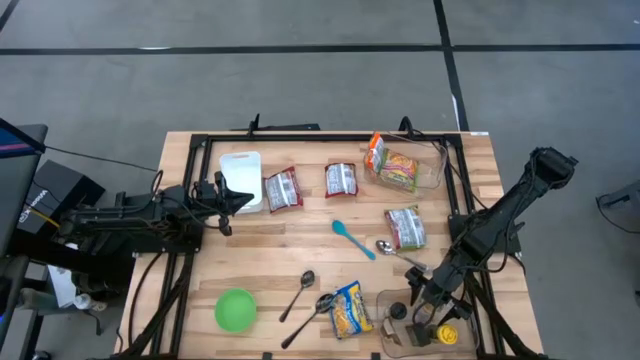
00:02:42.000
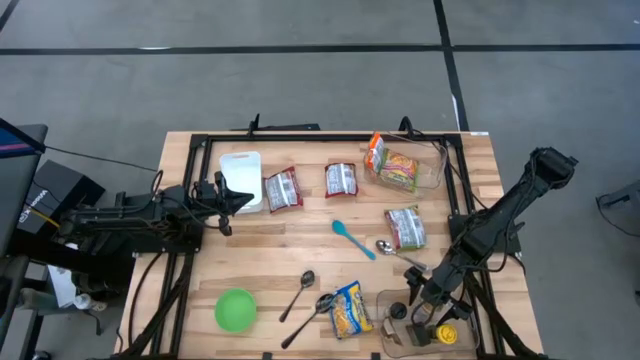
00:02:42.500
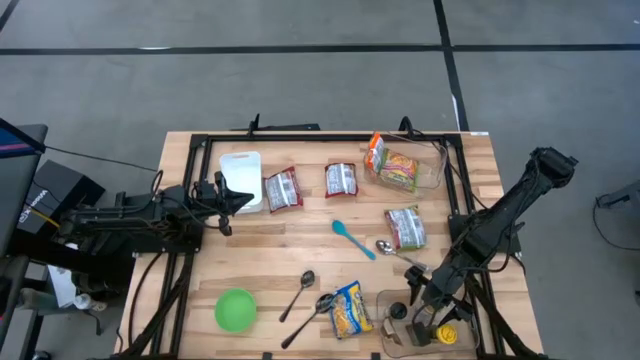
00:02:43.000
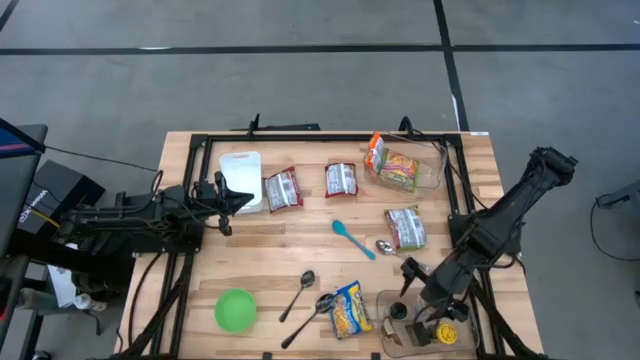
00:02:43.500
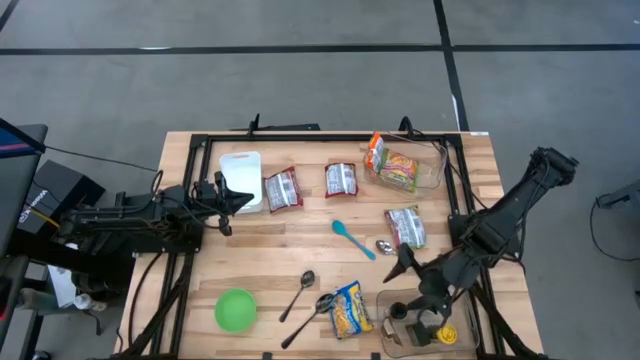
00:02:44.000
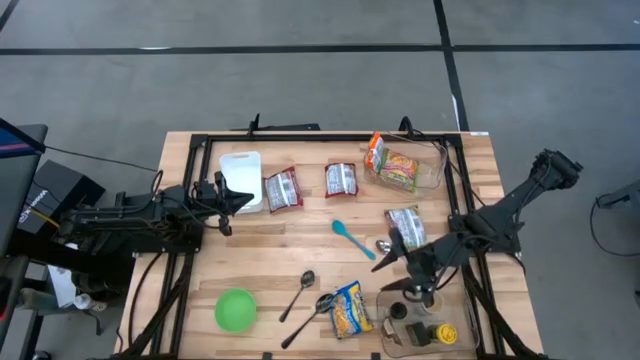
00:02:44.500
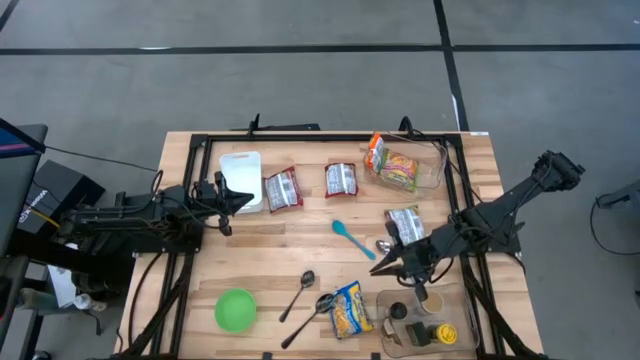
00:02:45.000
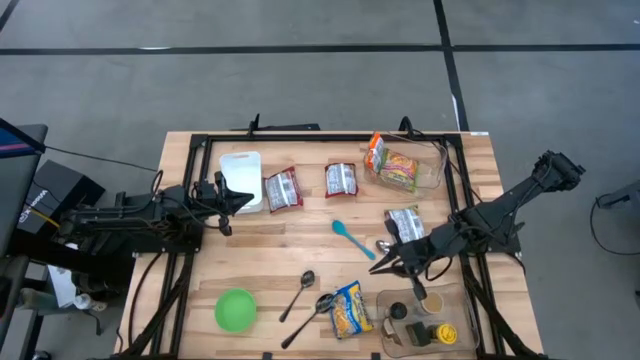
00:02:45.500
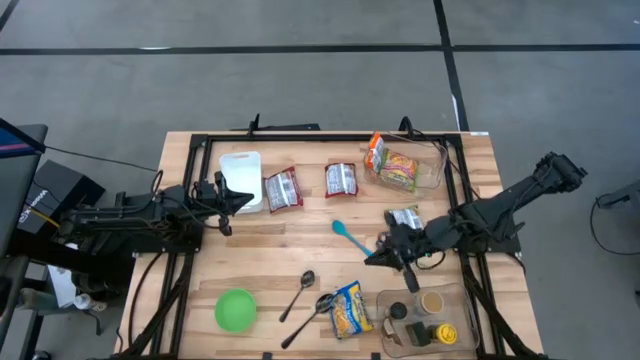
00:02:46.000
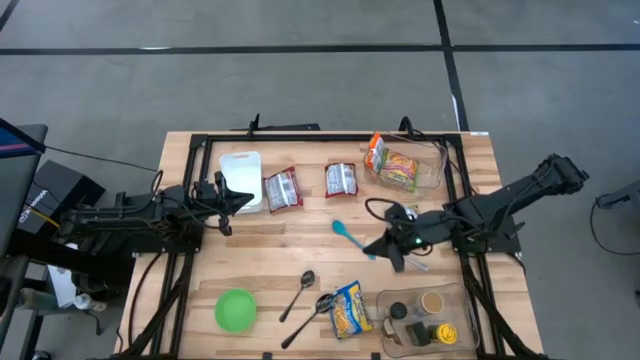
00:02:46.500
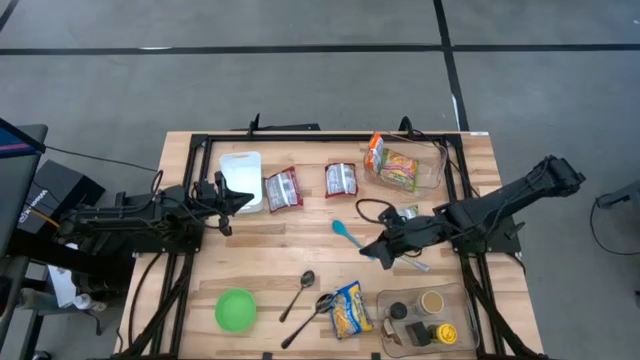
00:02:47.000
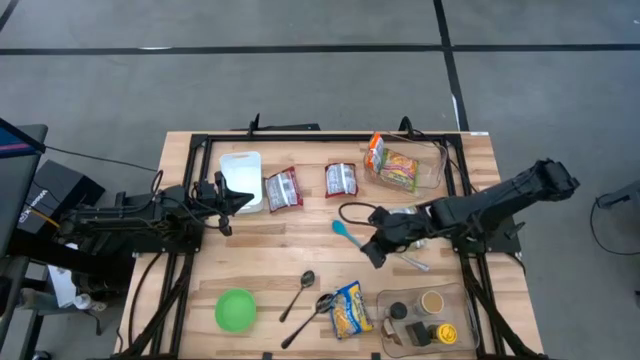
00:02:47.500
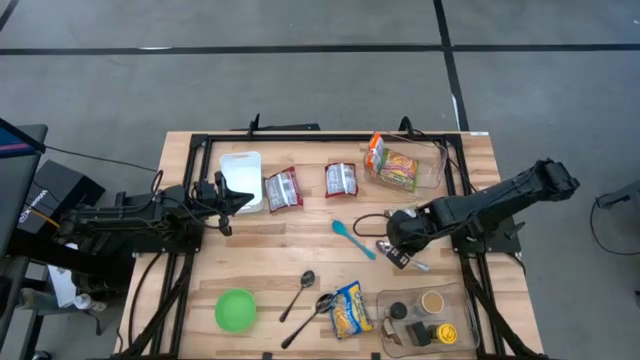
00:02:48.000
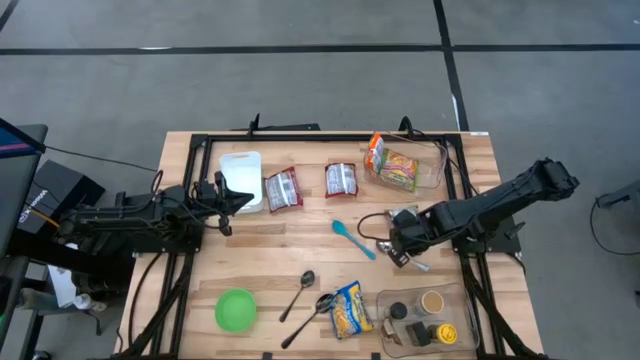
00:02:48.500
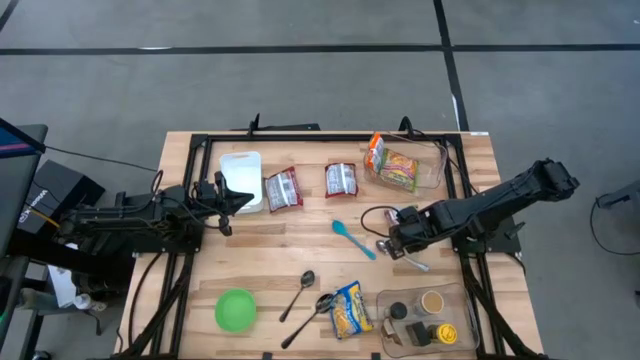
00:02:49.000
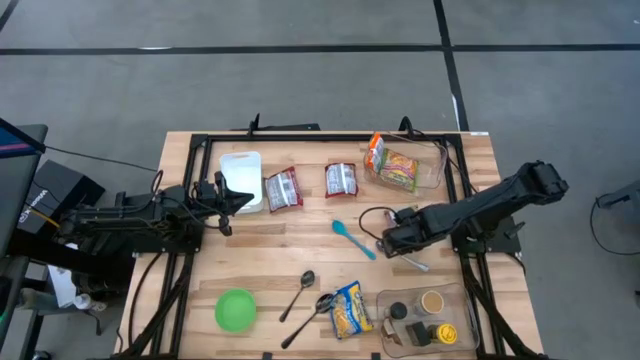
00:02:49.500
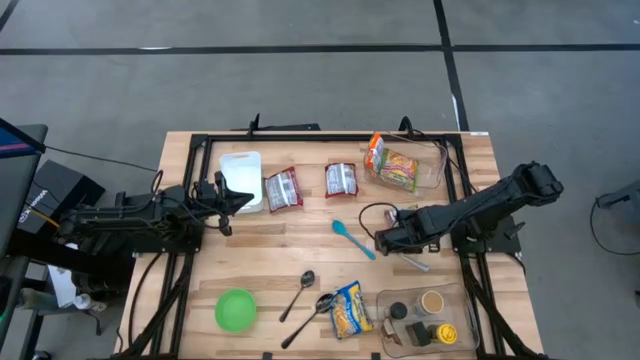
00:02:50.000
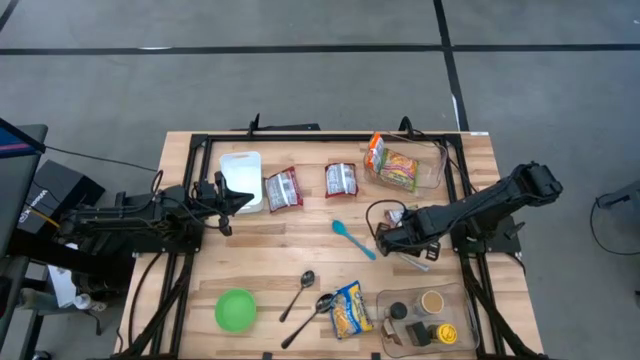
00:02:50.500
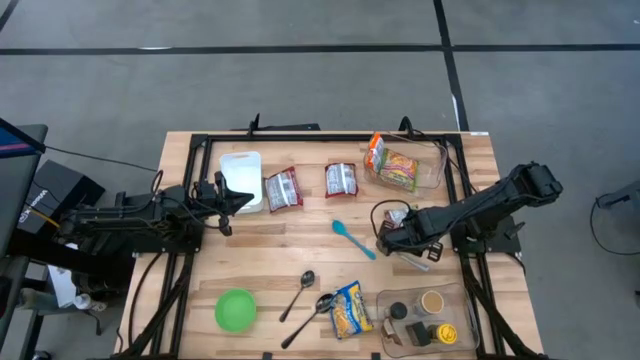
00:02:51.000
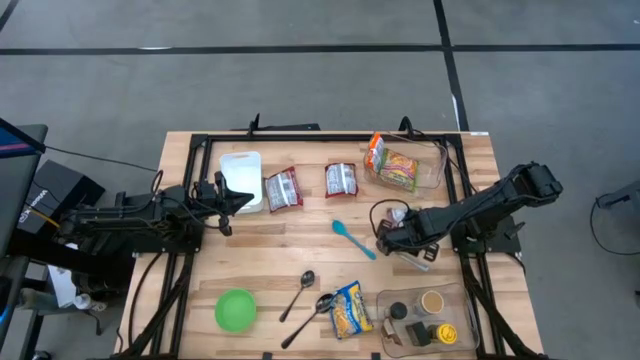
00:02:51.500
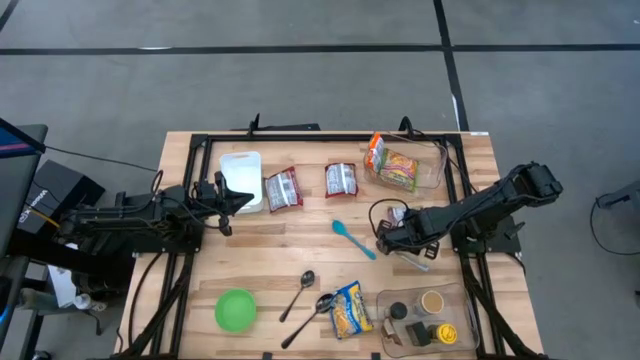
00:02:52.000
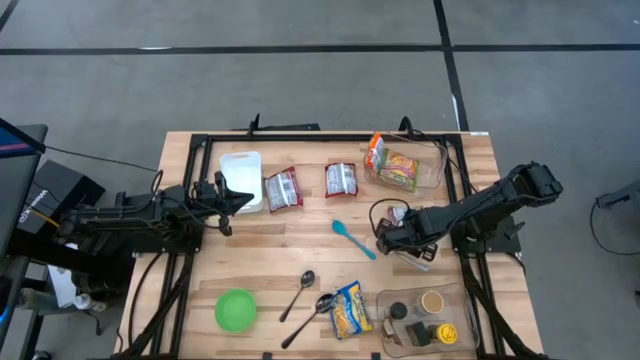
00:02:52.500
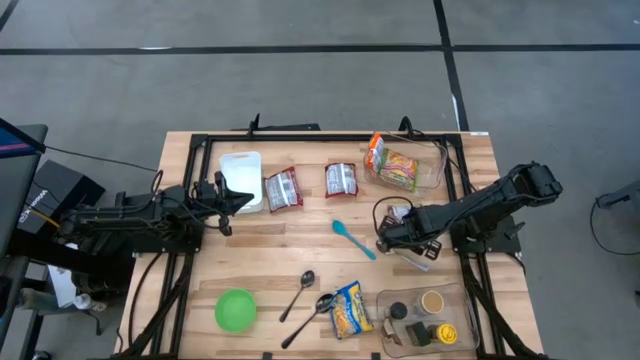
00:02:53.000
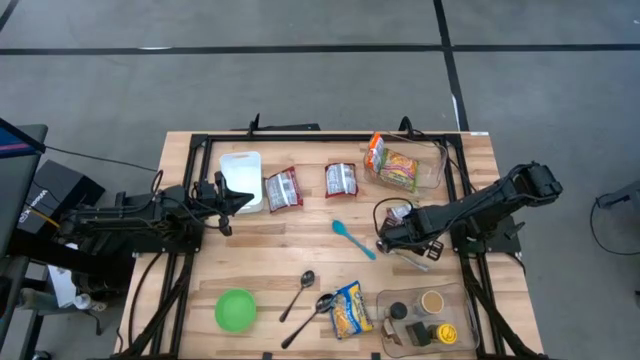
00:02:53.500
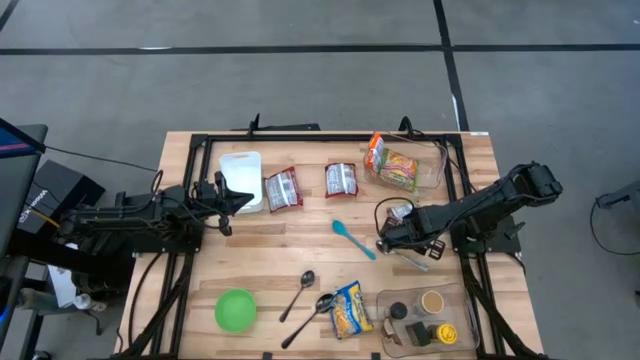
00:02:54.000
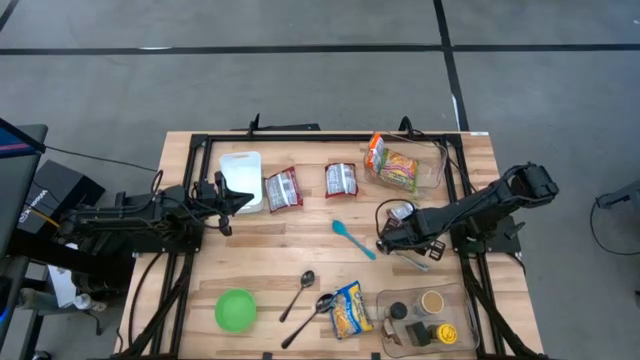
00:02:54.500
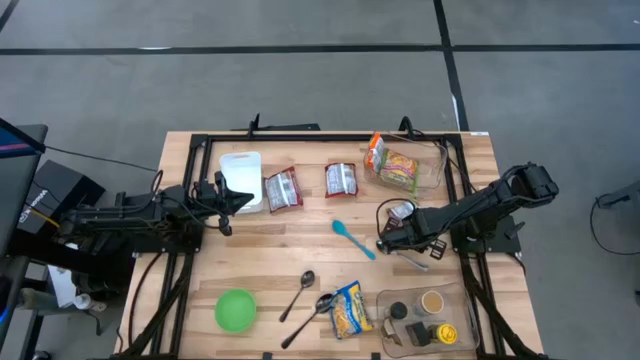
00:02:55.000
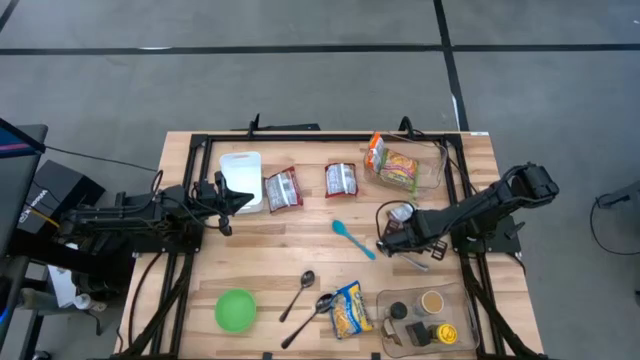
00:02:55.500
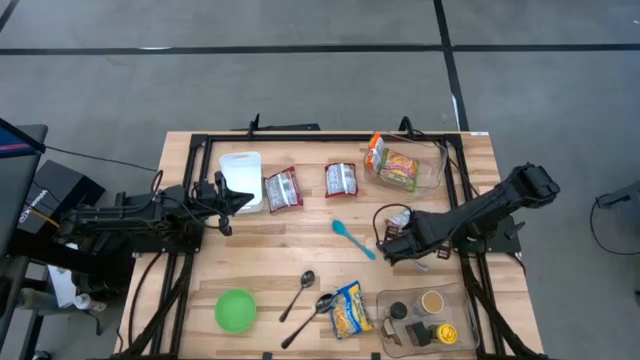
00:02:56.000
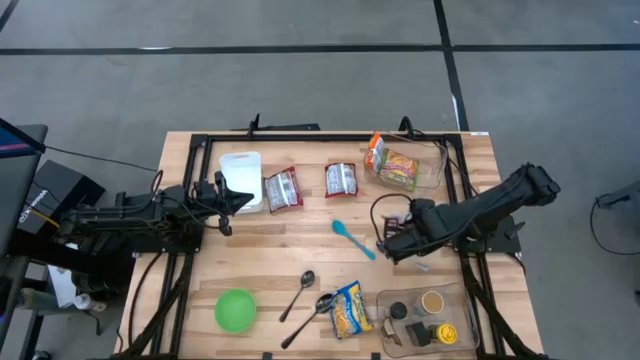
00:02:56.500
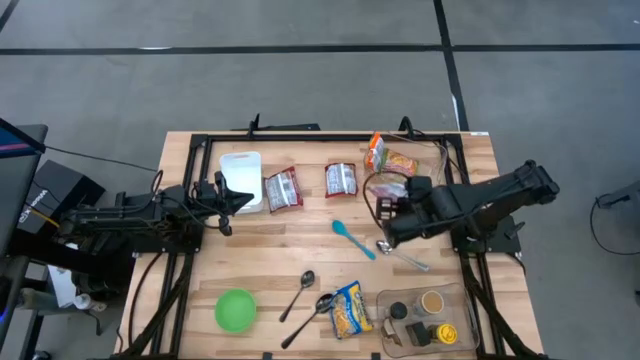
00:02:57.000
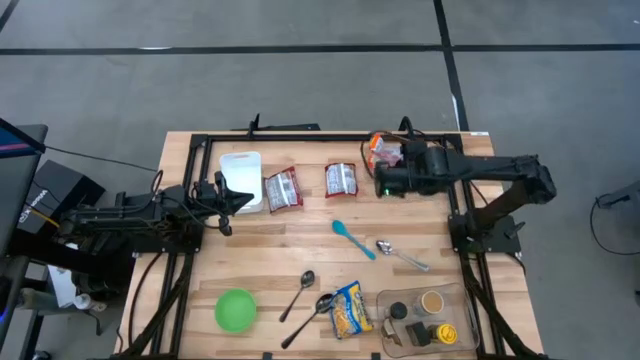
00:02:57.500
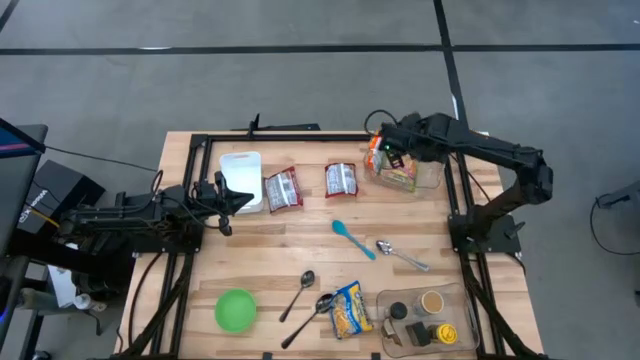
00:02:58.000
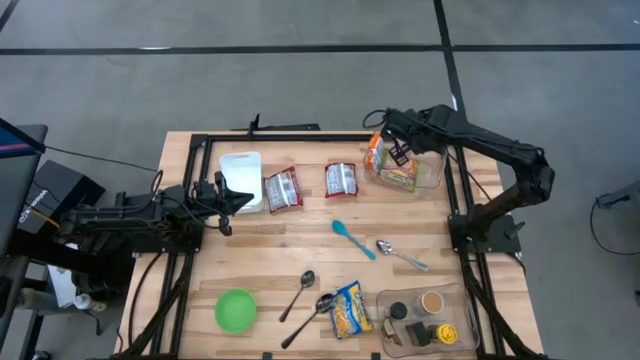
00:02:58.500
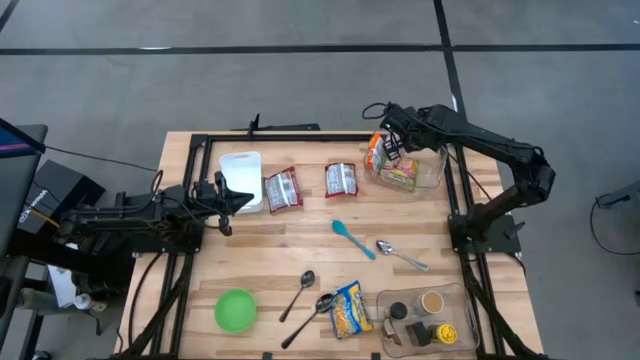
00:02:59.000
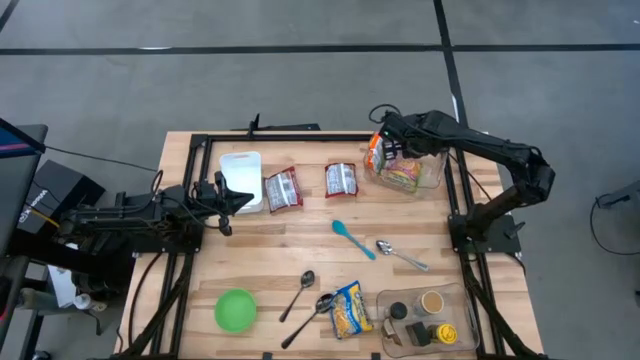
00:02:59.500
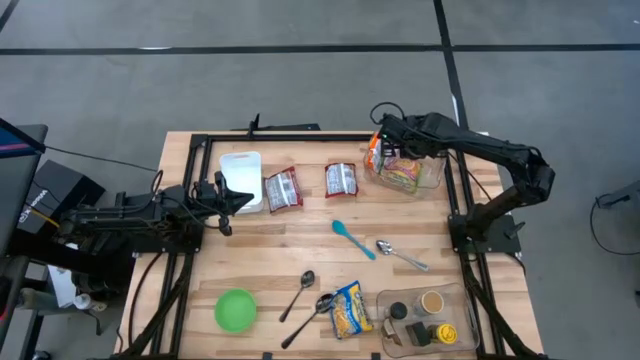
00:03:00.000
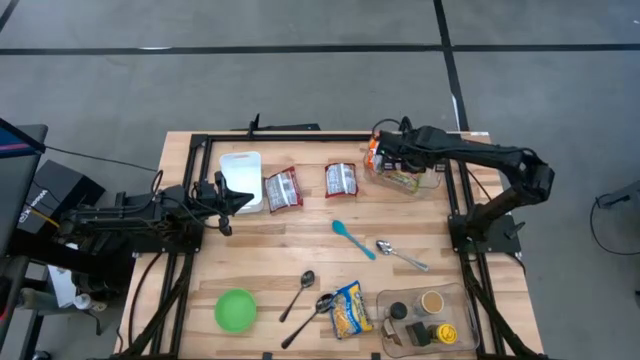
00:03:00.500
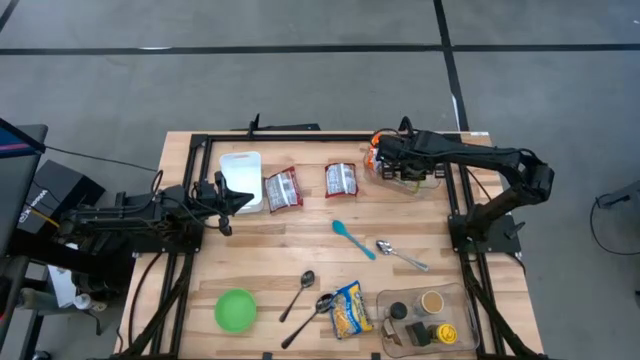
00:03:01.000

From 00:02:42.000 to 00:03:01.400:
Task: Pick & Place Food Item
Put the green noodle pack into the top transparent bin

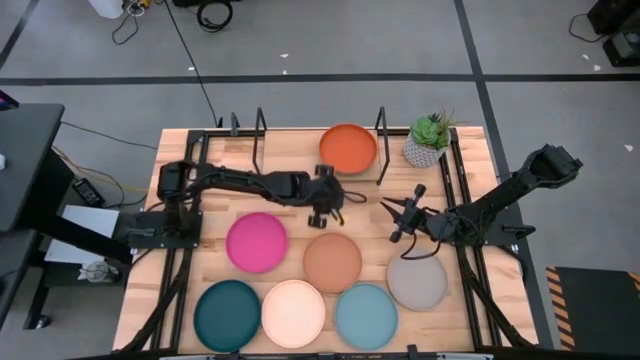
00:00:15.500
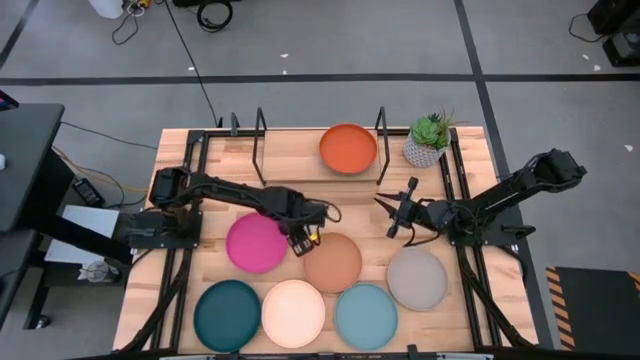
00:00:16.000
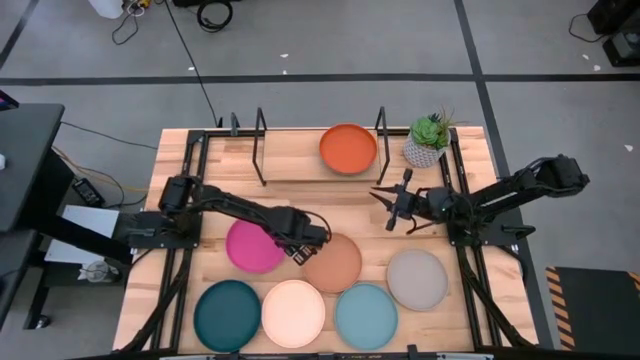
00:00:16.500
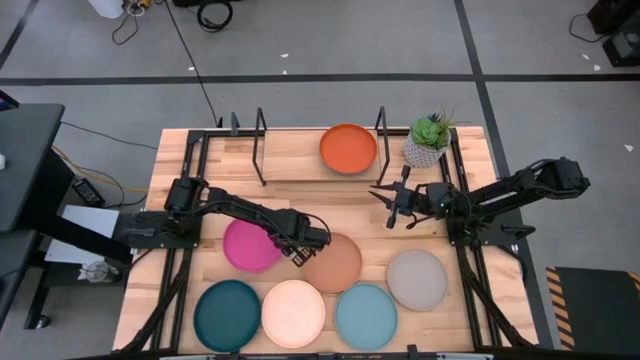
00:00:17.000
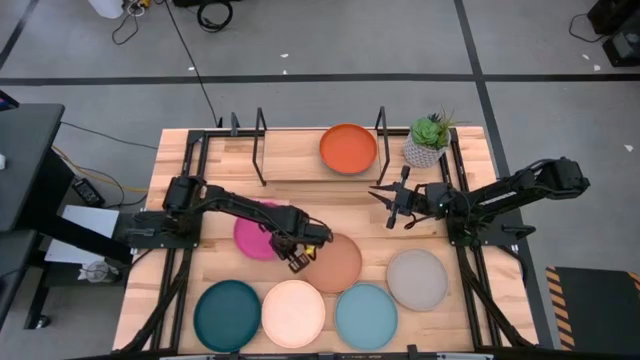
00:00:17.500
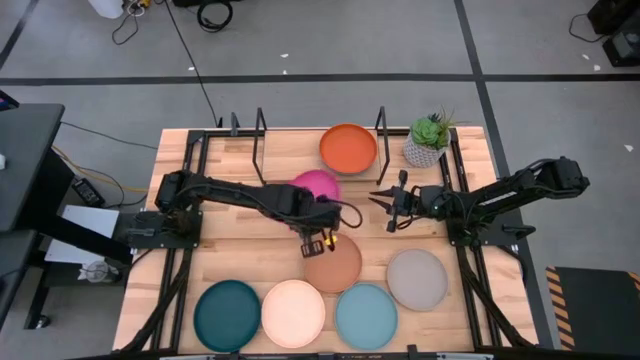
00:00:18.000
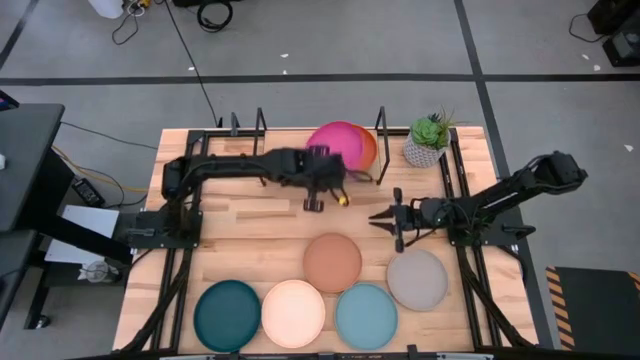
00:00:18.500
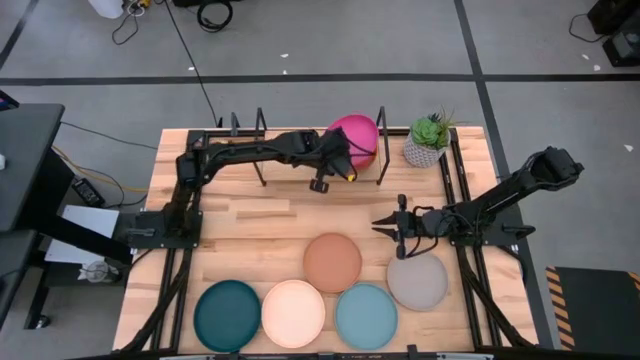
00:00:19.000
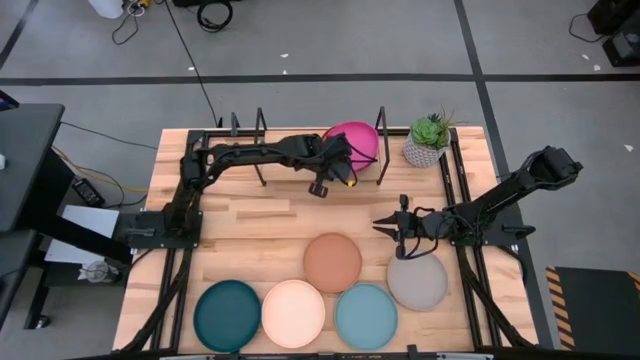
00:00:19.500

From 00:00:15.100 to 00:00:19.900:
Task: Place and stack plates onto a shelf
Stack the pink plate on top of the orange plate on the shelf
